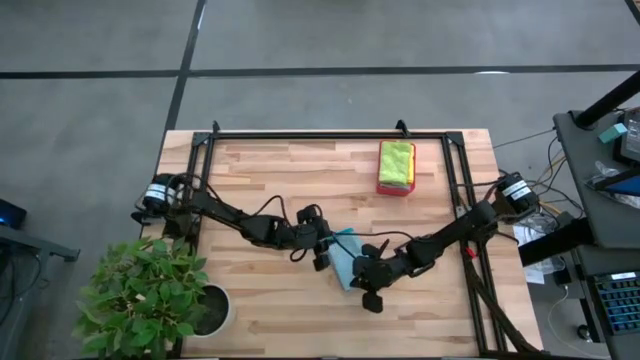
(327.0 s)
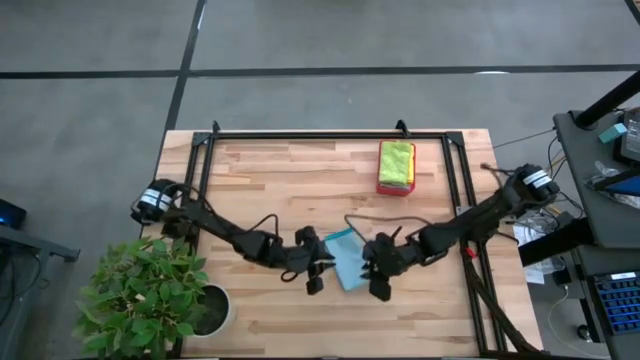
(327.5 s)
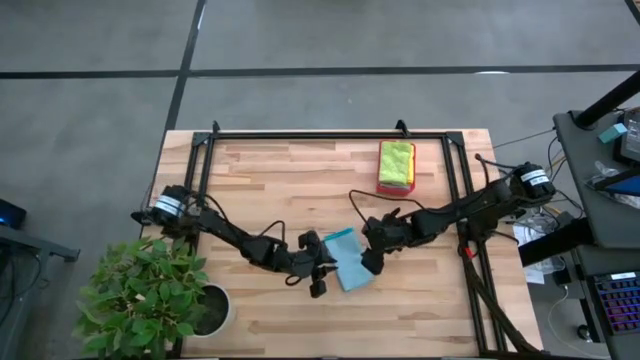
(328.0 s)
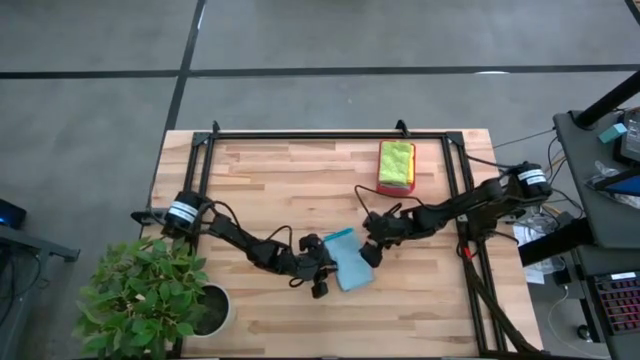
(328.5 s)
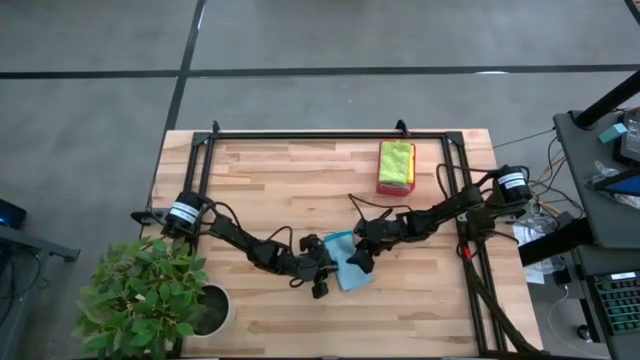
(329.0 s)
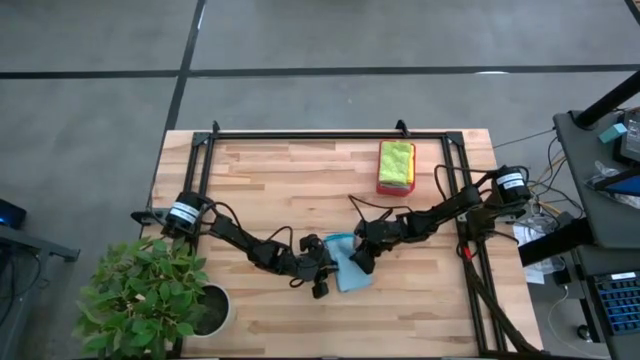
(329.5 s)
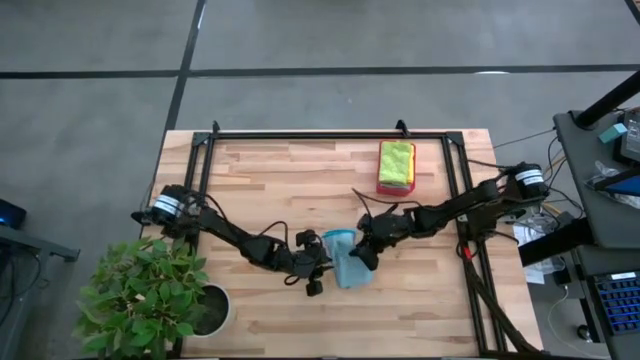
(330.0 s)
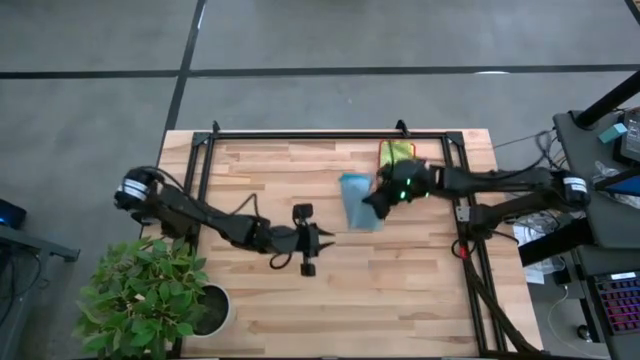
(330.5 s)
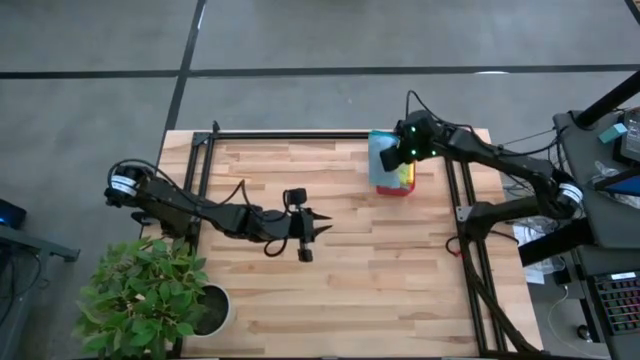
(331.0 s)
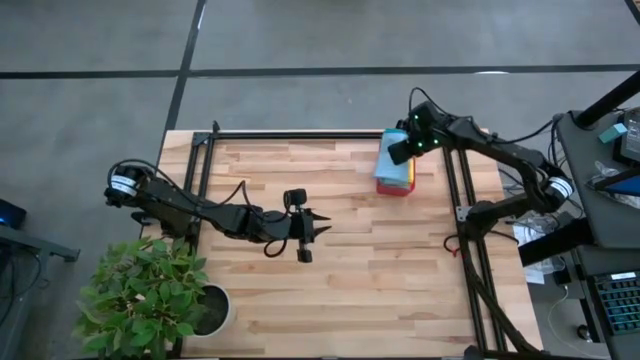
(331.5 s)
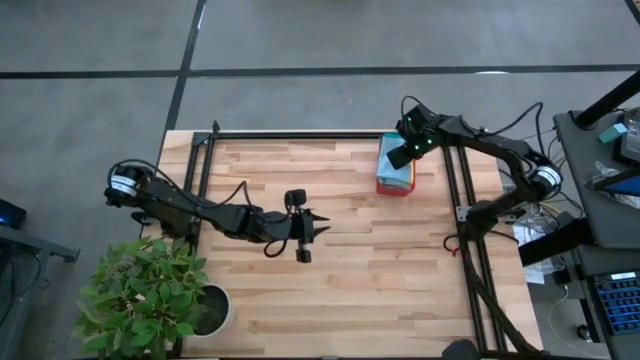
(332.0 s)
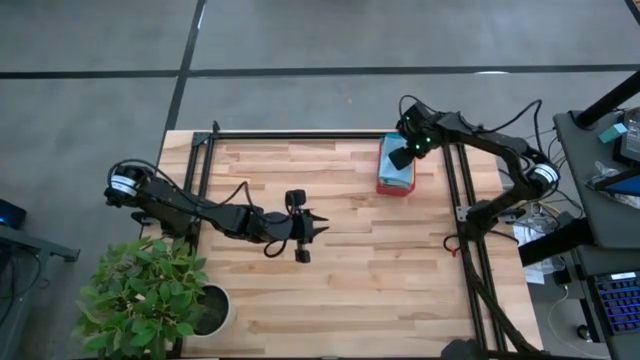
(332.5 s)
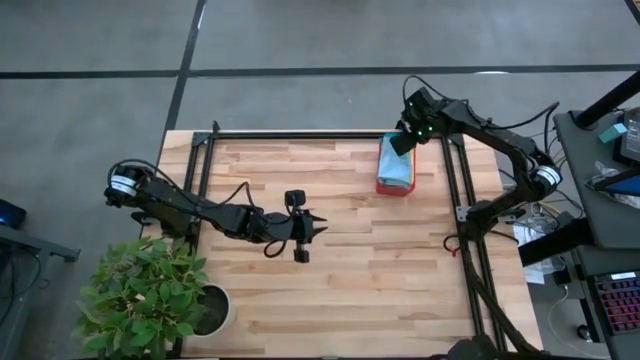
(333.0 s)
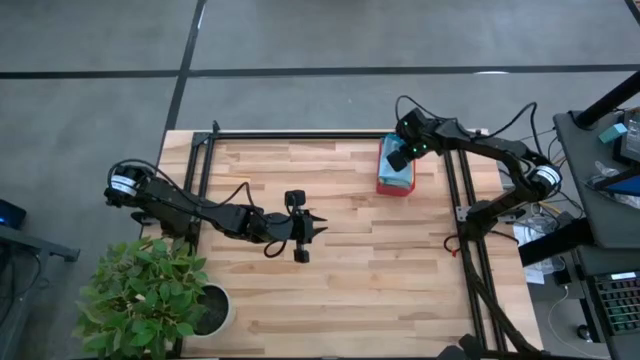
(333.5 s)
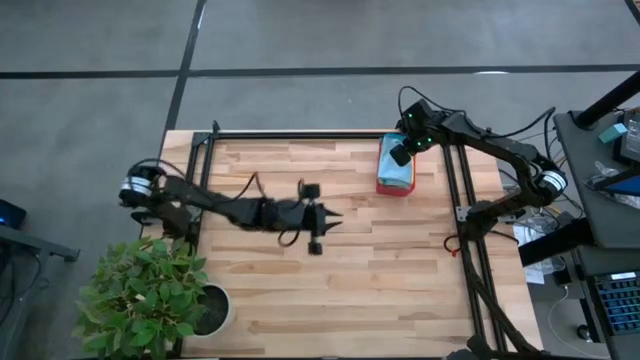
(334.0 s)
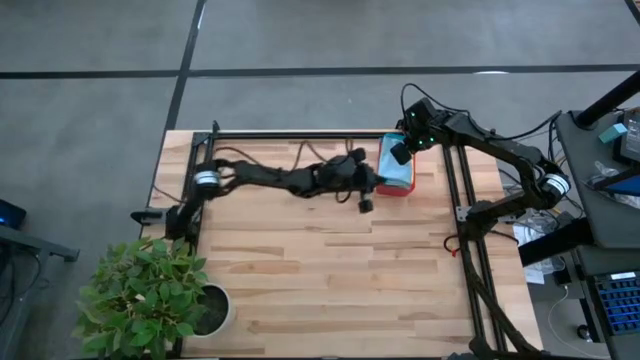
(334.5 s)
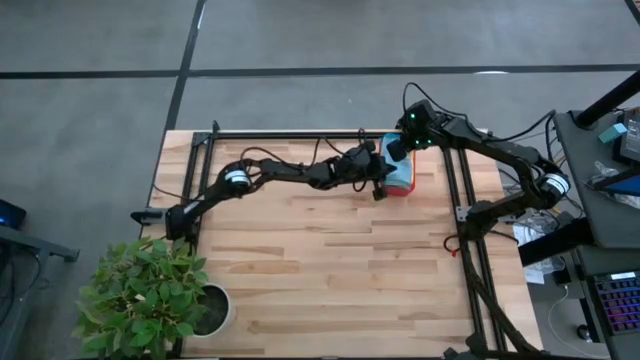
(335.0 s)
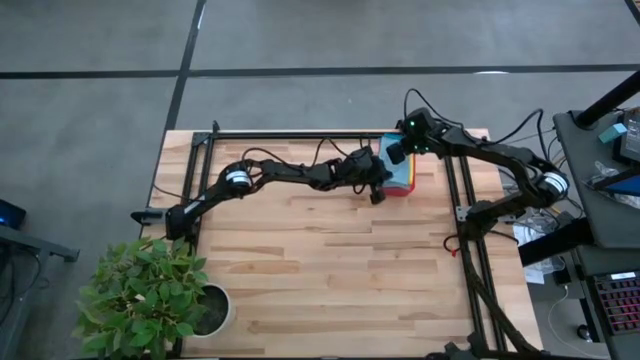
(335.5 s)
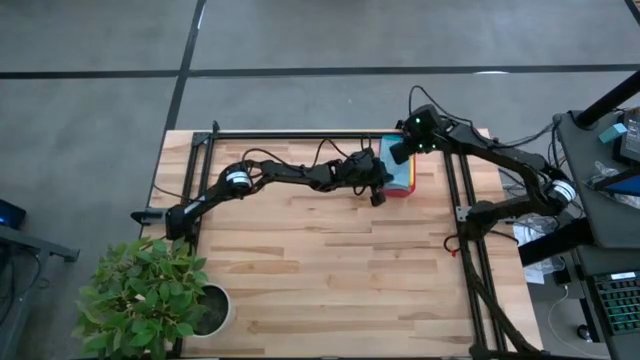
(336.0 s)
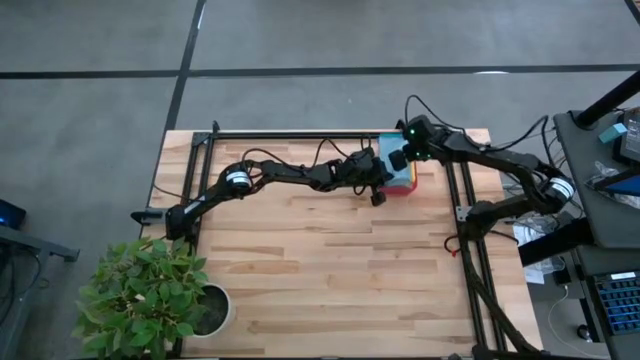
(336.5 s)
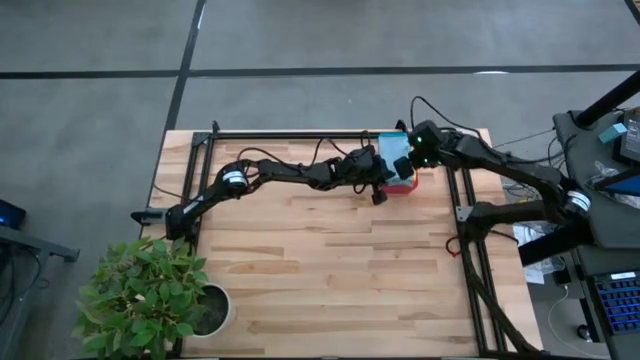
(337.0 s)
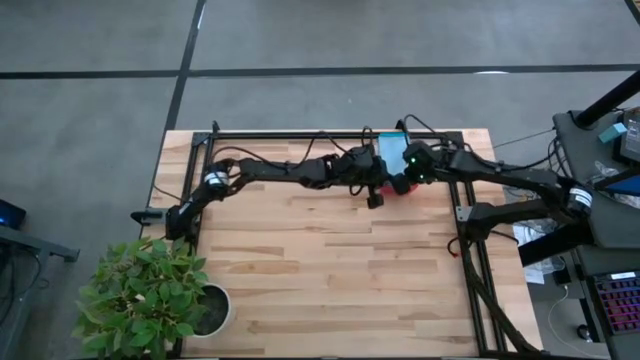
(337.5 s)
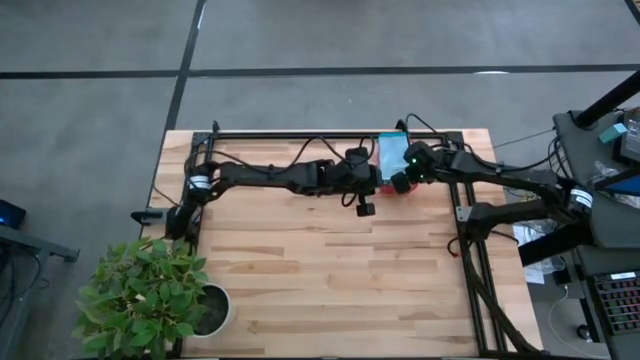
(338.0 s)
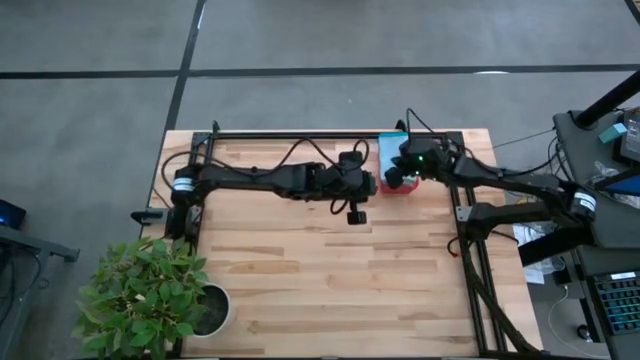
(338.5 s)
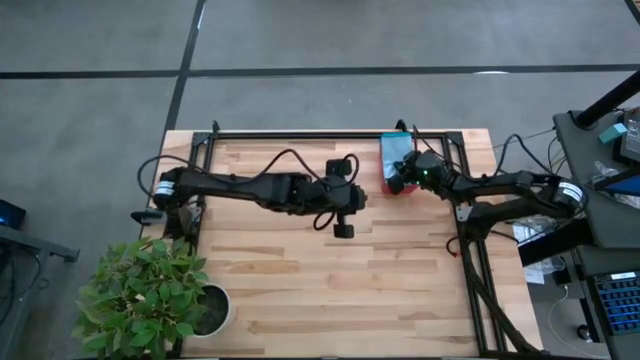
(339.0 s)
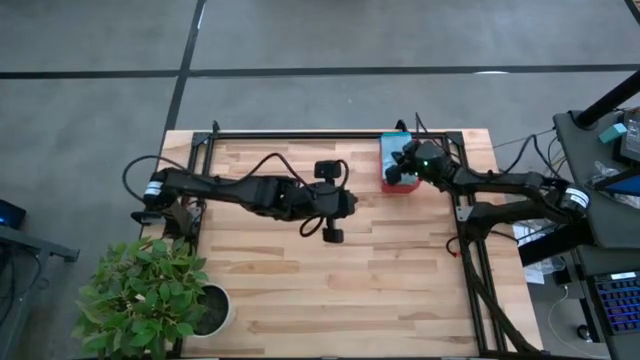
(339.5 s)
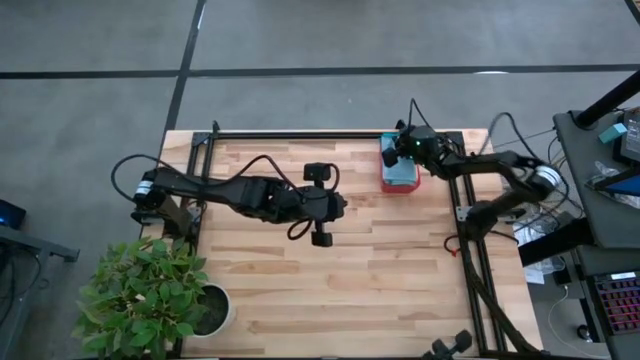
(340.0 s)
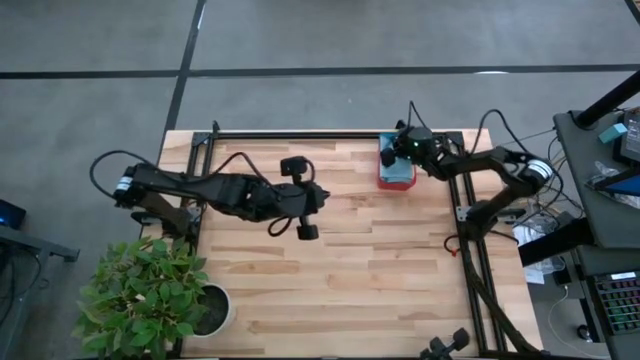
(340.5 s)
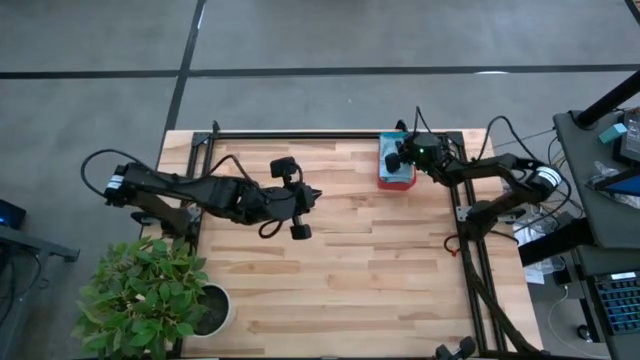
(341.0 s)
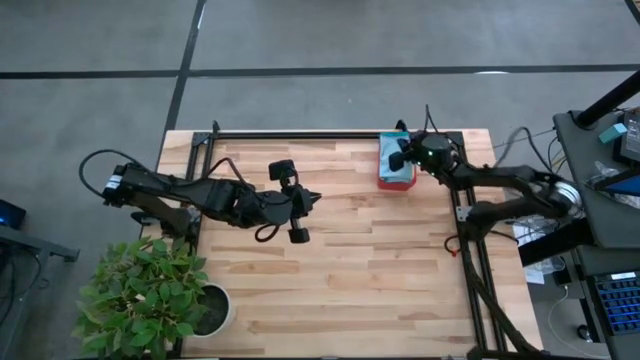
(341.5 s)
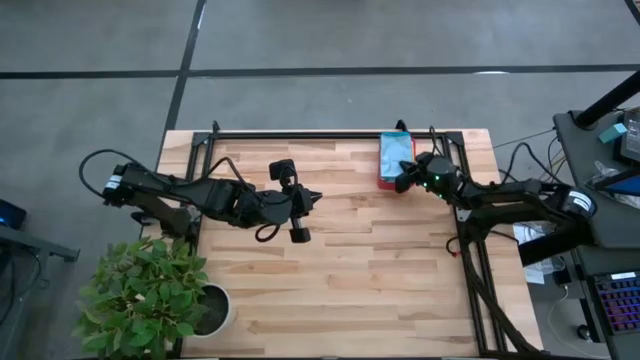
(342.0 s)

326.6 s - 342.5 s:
Task: Fold microfiber towels
Put the folded blue microfiber towel into the red bin

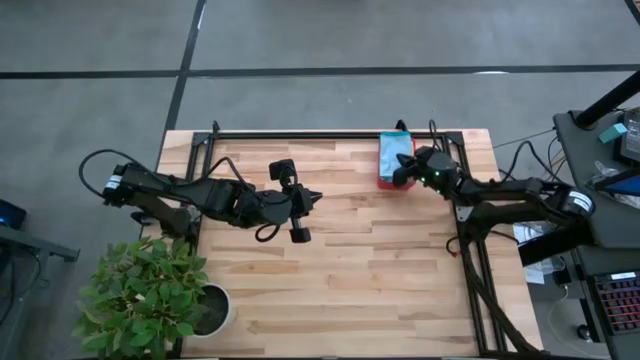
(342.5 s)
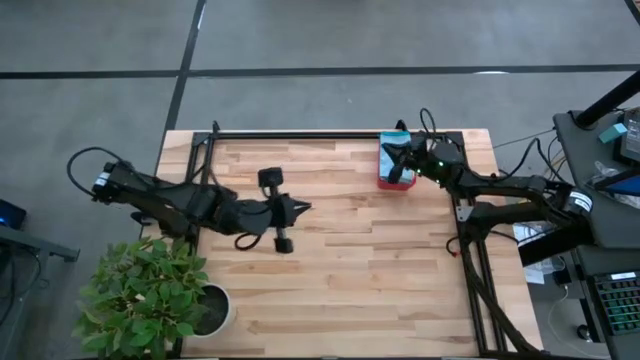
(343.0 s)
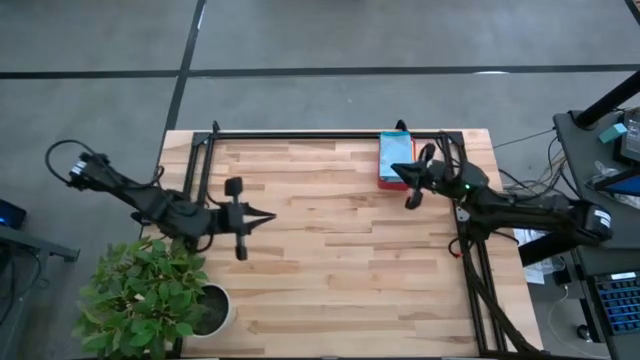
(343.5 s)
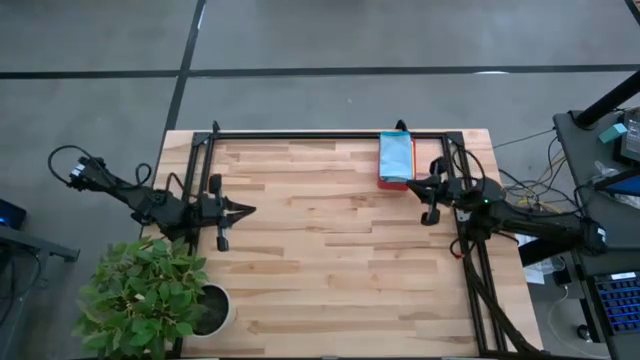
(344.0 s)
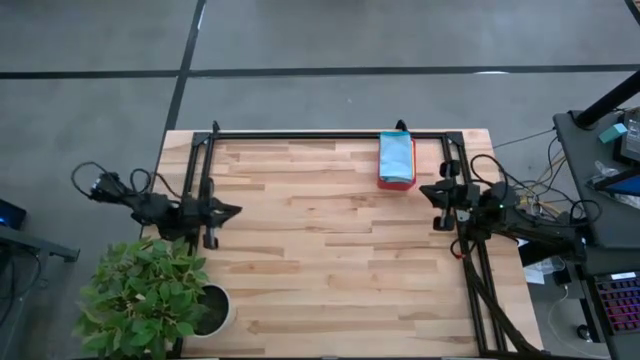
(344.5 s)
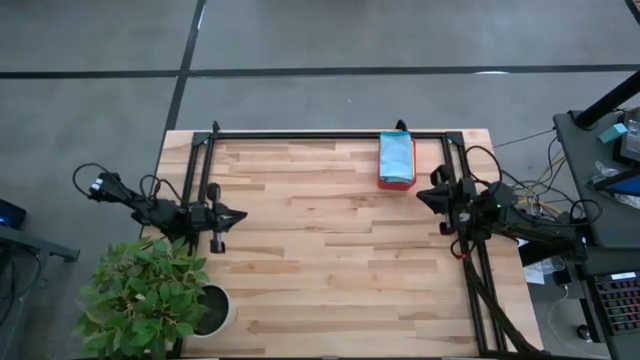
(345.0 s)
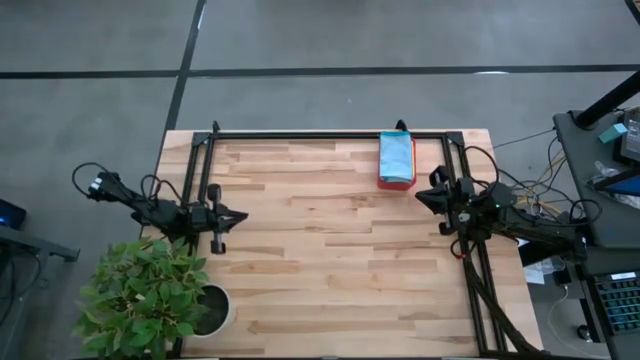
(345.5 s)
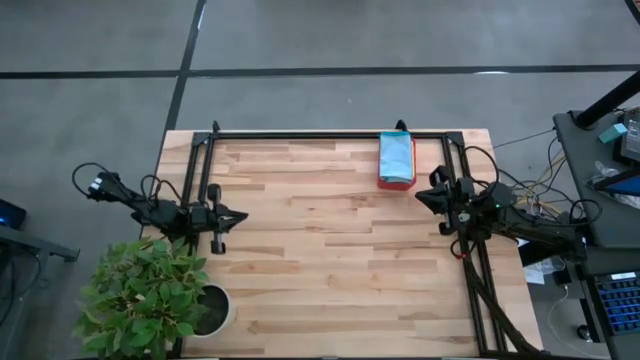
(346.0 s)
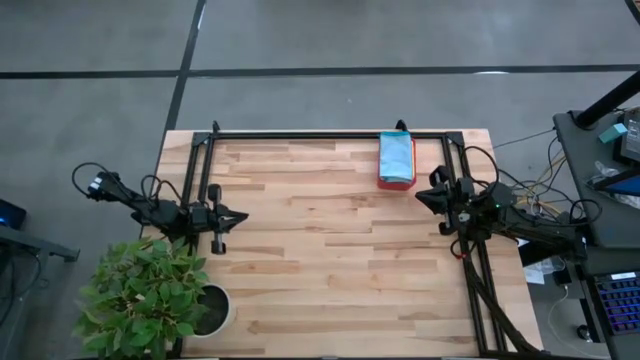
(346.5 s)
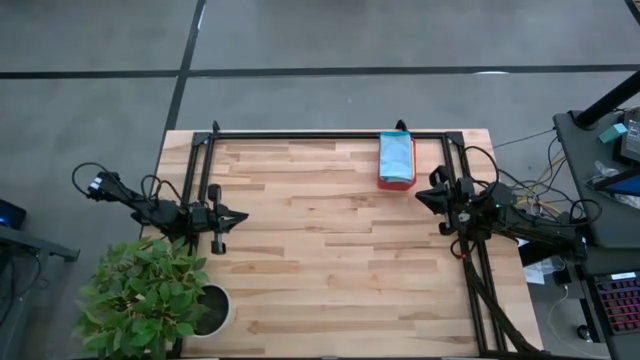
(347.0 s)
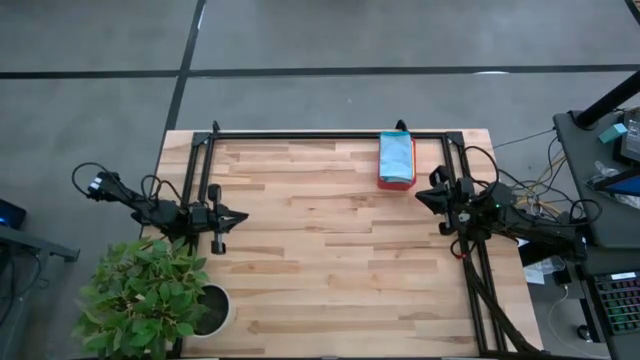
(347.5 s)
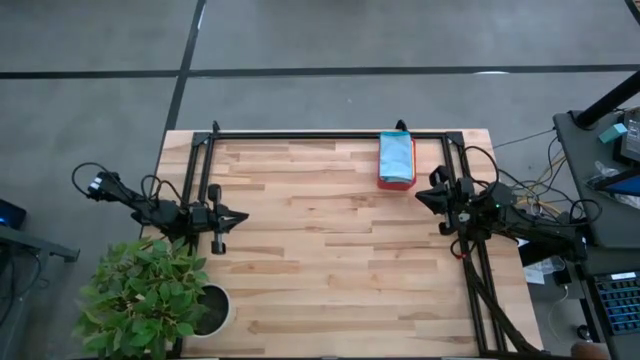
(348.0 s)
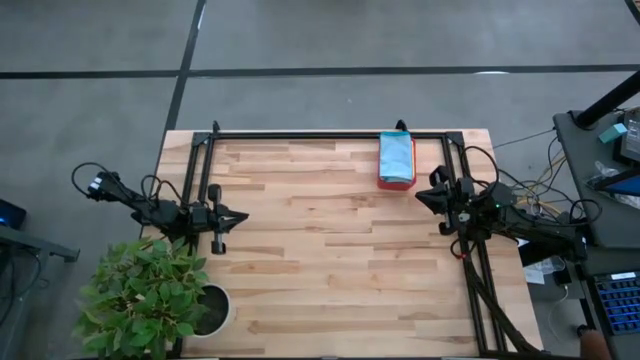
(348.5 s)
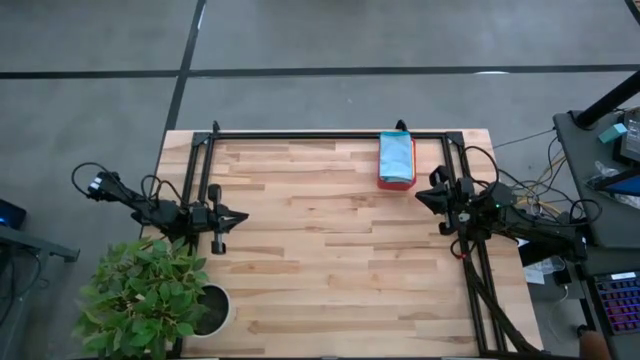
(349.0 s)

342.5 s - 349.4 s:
Return to Home Position
